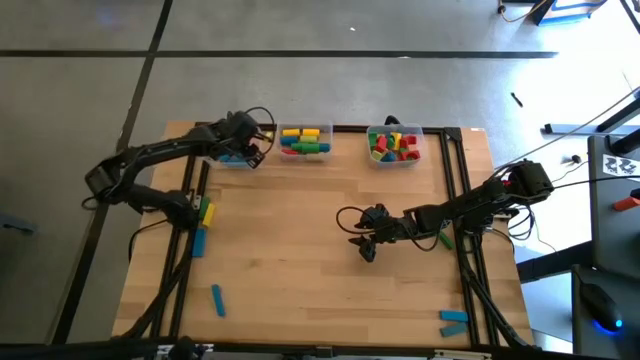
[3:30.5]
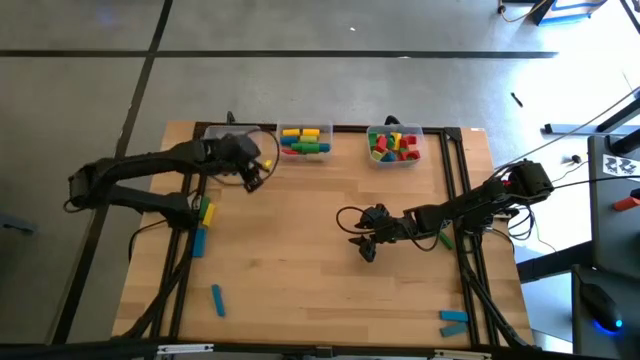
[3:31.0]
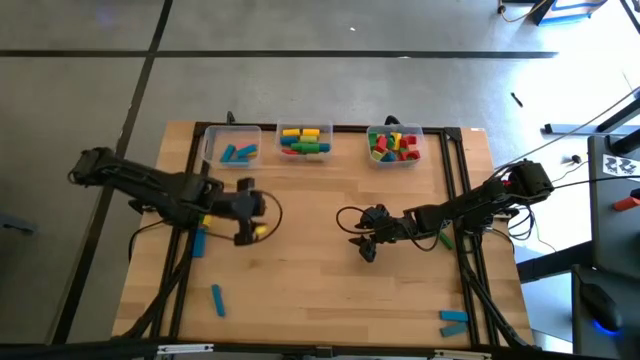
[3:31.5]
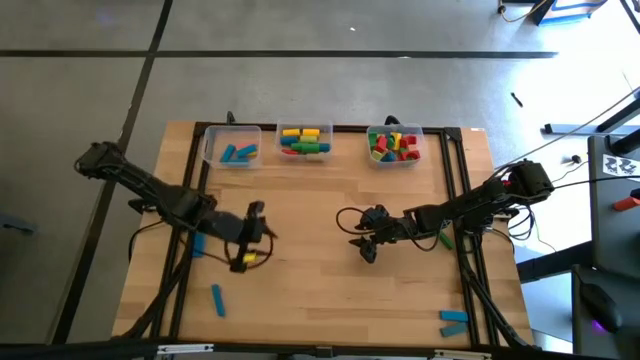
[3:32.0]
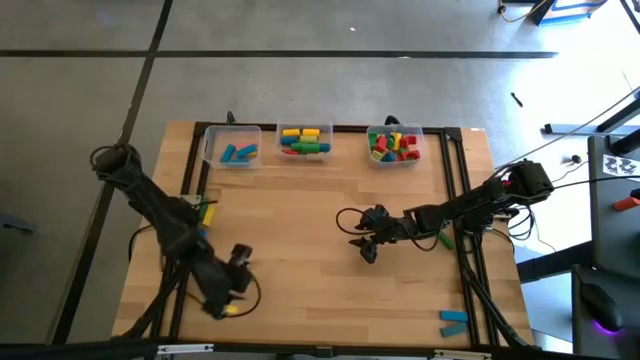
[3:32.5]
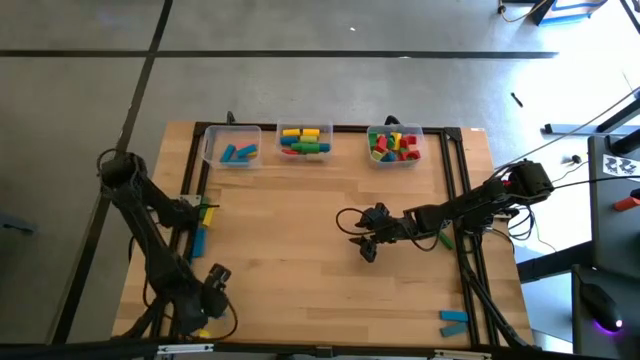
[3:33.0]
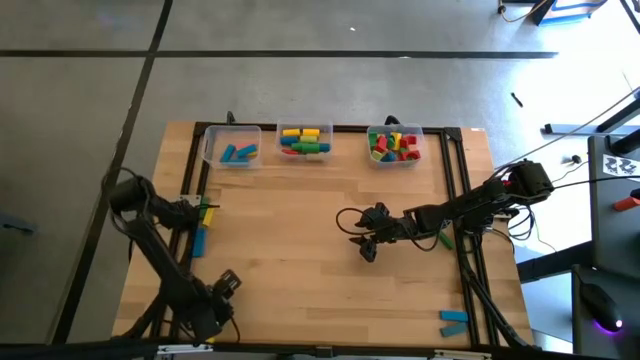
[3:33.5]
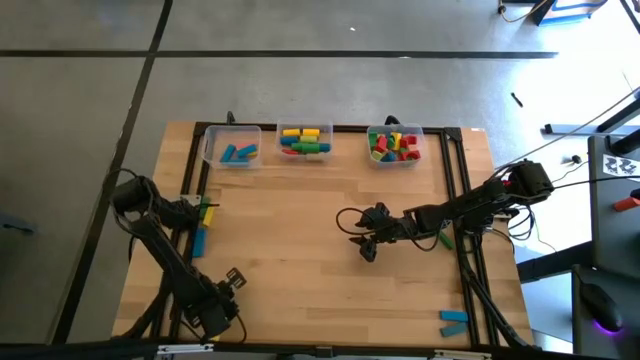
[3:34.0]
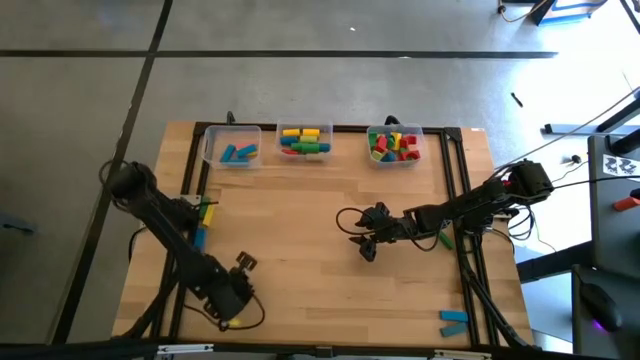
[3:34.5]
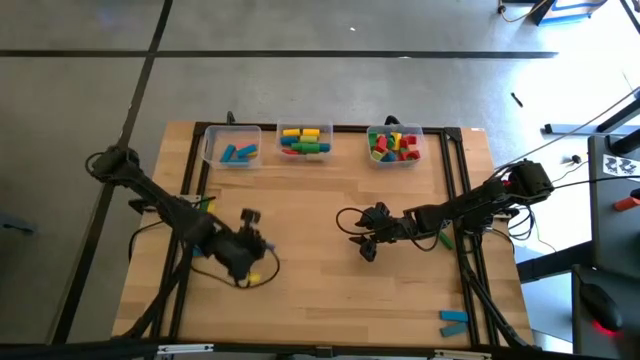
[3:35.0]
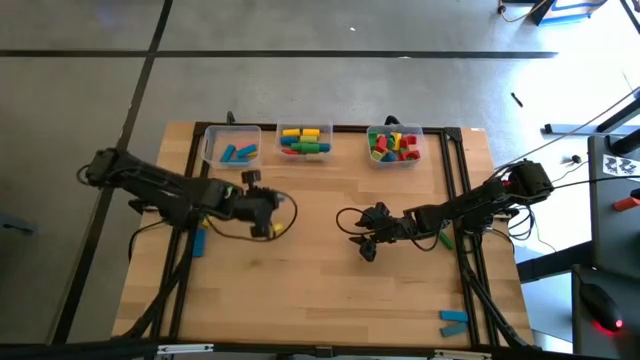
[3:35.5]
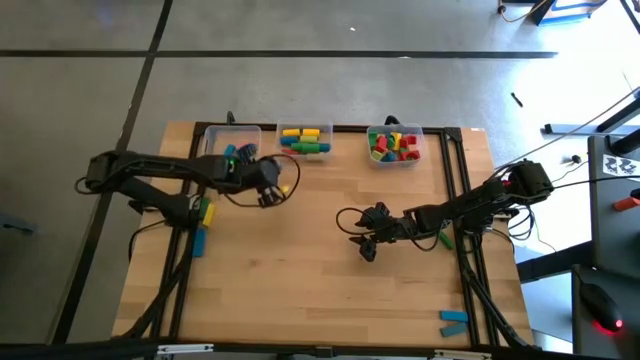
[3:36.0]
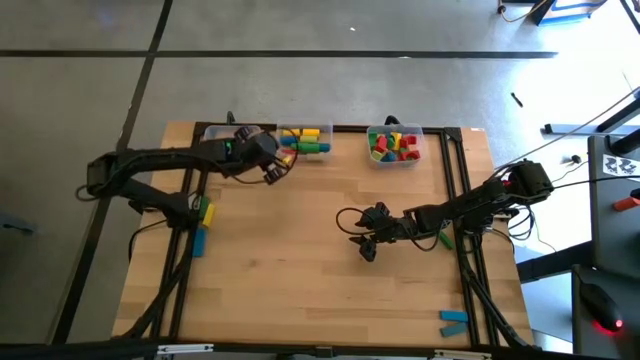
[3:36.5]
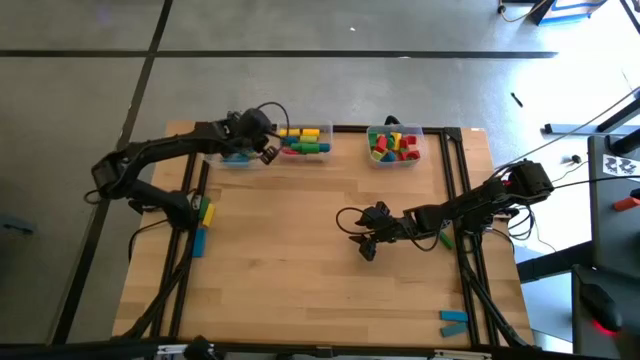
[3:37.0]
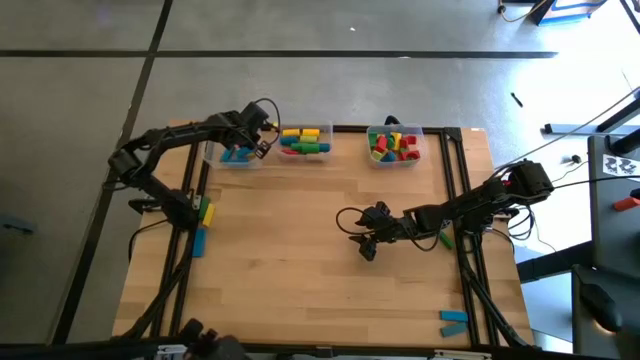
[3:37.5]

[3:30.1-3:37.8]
Task: Sort blocks by size
Put the blue rectangular block into the left transparent bin

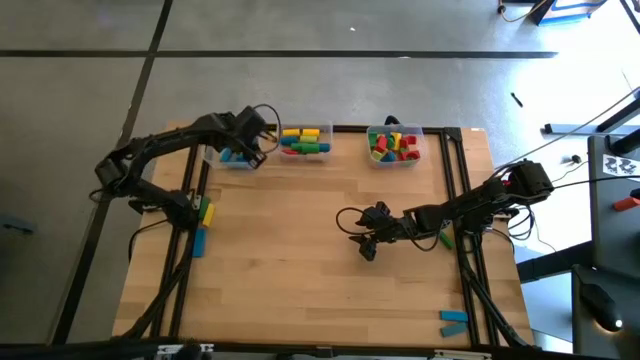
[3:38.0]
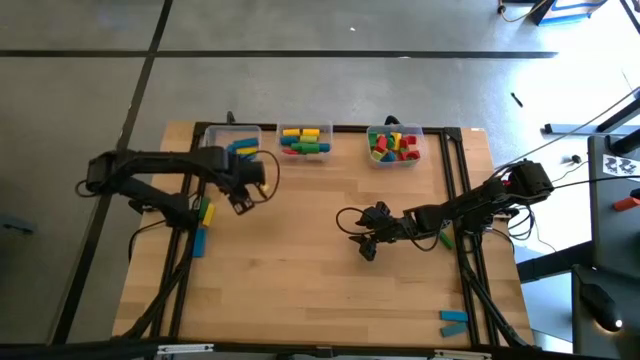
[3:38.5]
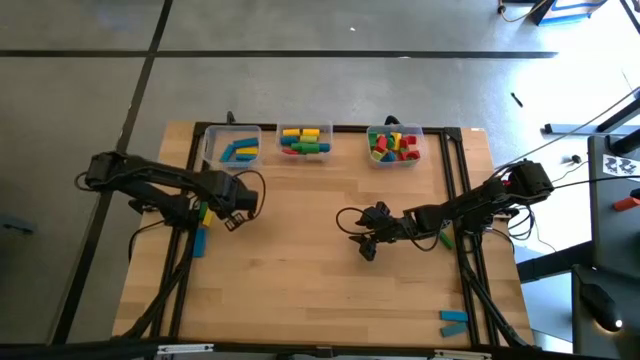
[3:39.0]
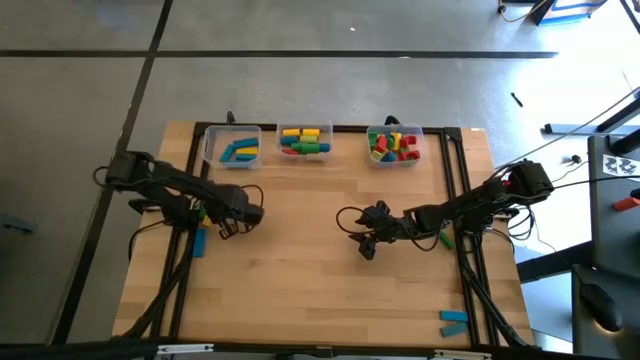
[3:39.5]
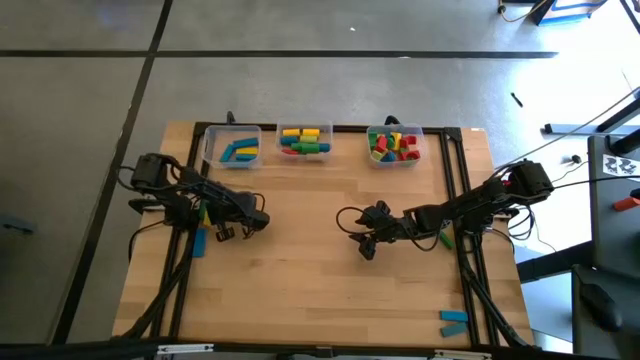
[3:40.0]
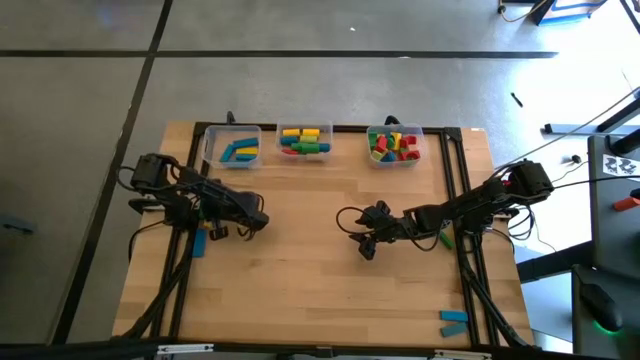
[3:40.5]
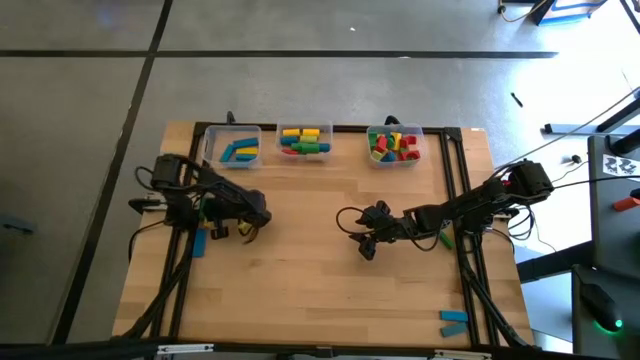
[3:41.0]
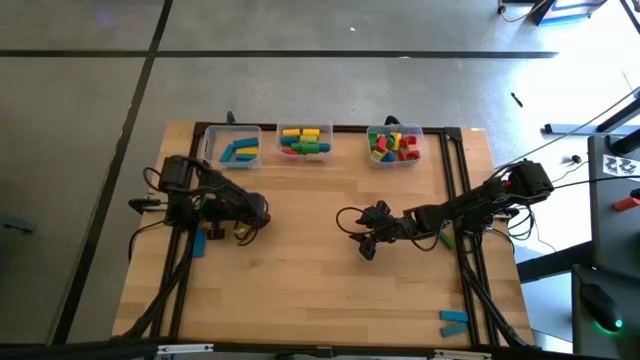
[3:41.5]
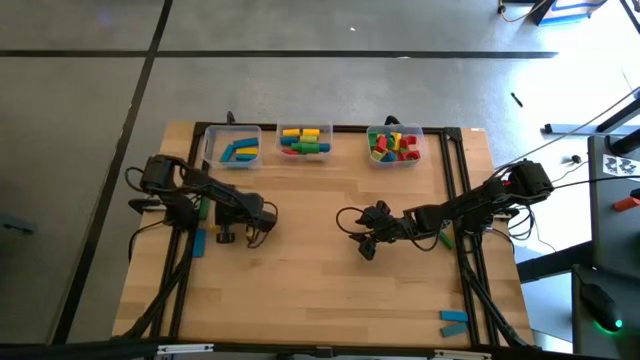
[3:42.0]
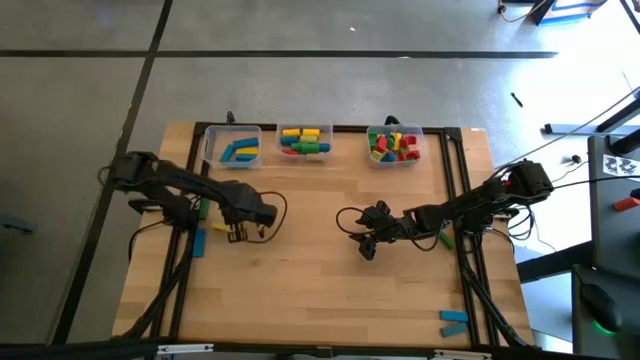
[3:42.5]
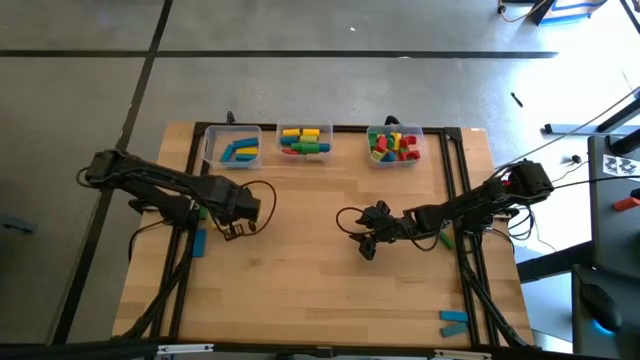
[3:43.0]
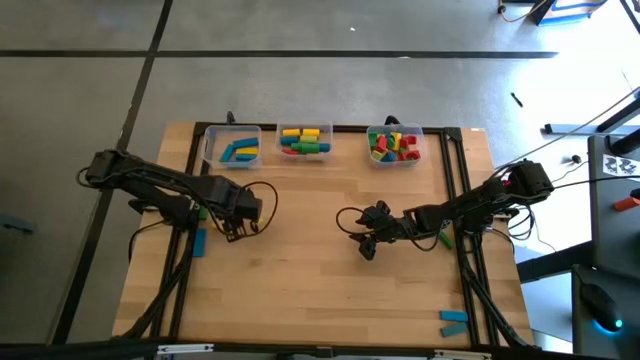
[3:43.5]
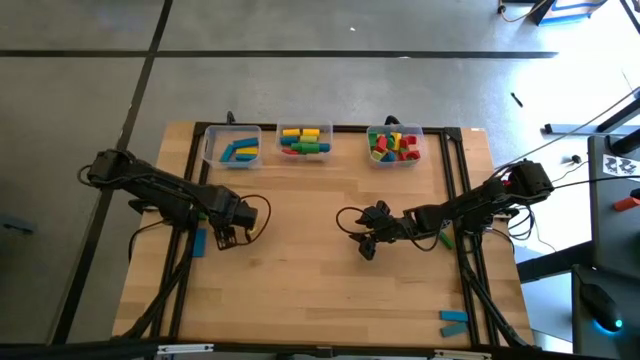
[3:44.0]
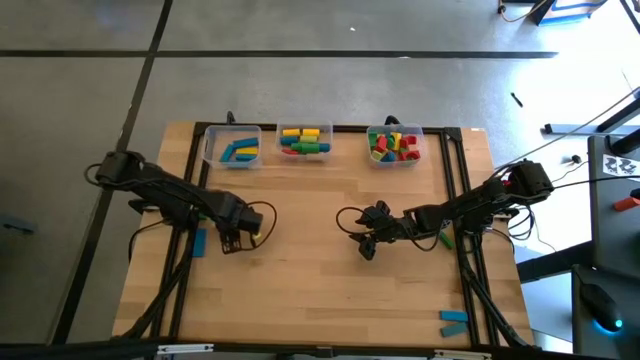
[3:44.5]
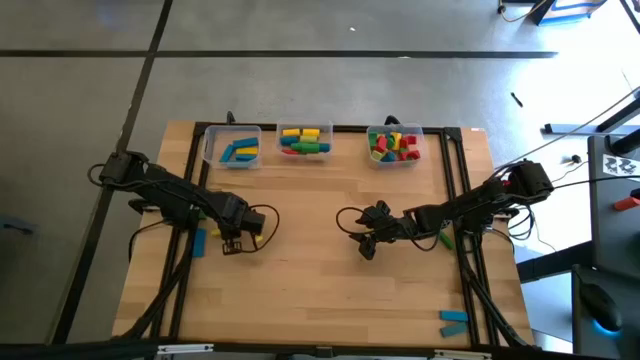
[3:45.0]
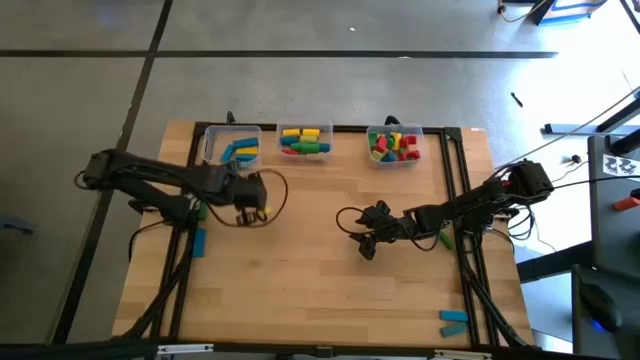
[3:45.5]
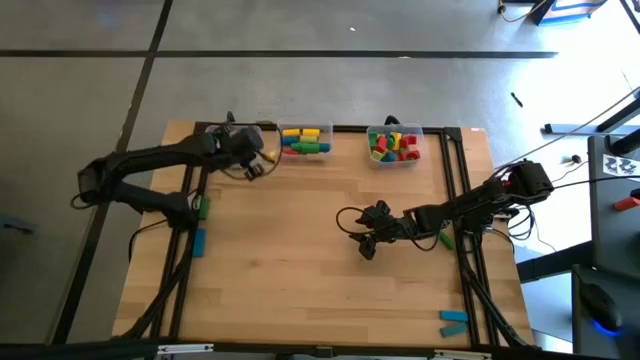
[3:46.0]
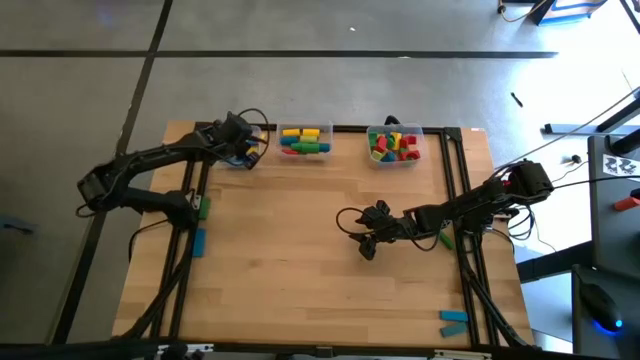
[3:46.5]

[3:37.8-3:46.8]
Put the yellow rectangular block into the left transparent bin

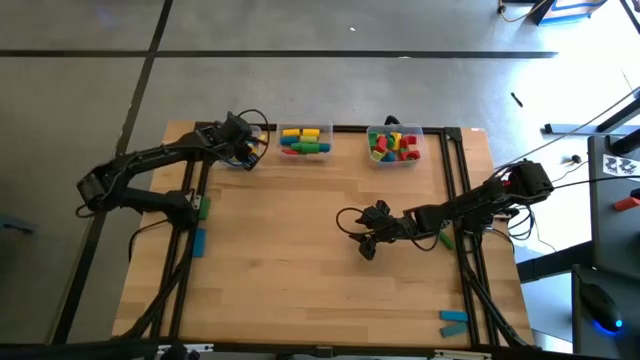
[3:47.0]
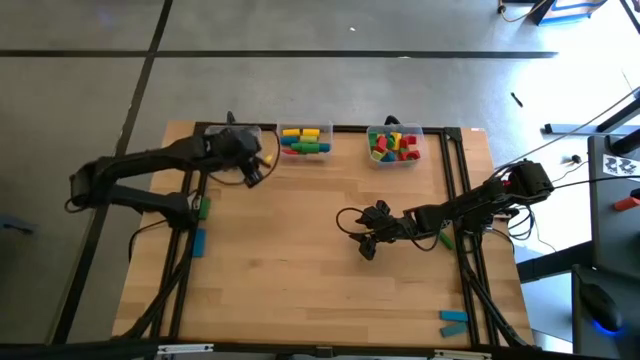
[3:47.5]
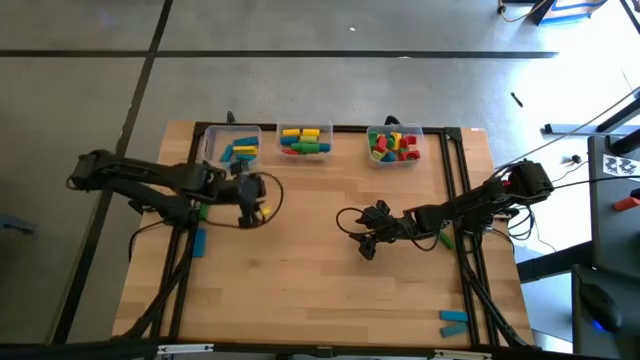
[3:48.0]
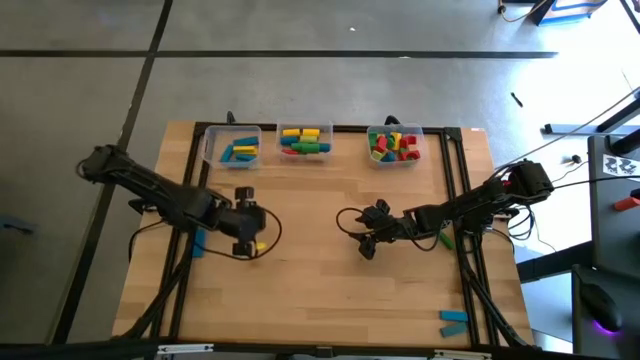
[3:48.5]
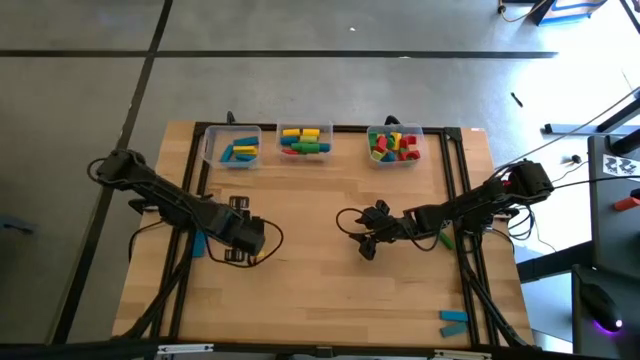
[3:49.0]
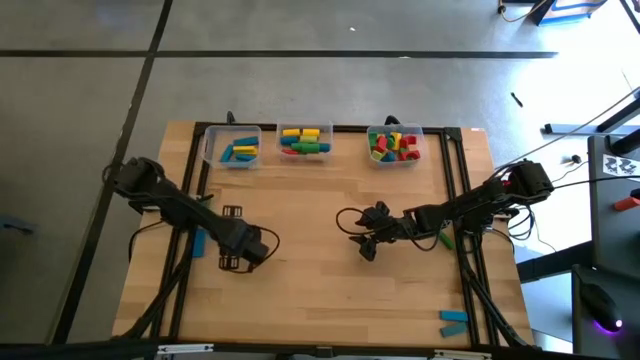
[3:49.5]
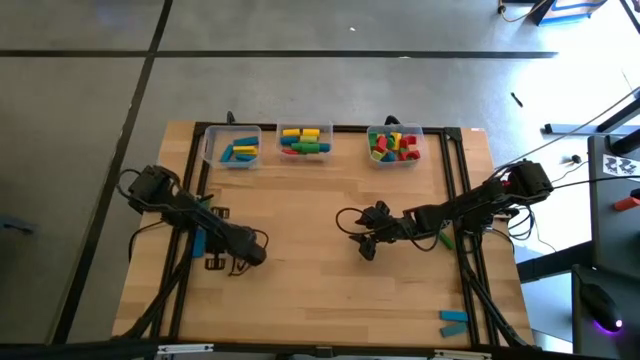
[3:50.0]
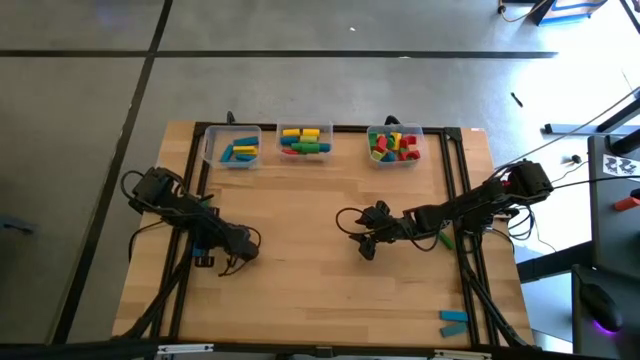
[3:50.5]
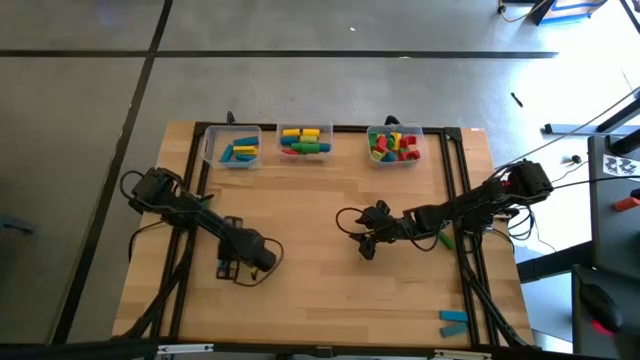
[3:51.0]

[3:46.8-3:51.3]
Adjust the blue rectangular block
